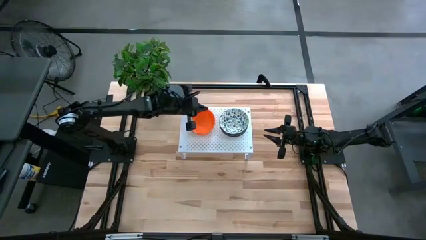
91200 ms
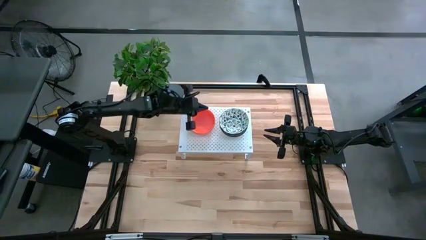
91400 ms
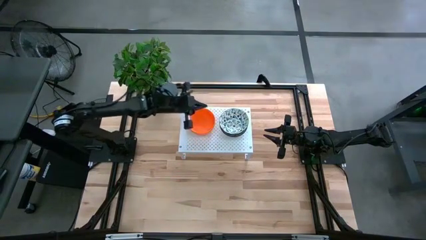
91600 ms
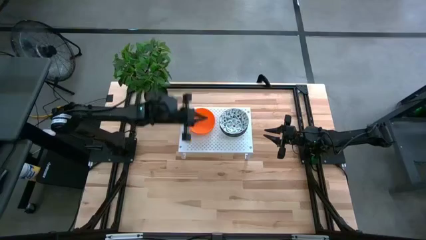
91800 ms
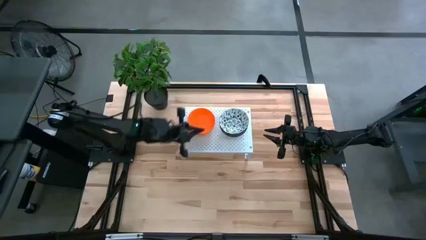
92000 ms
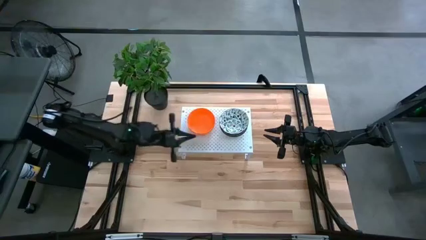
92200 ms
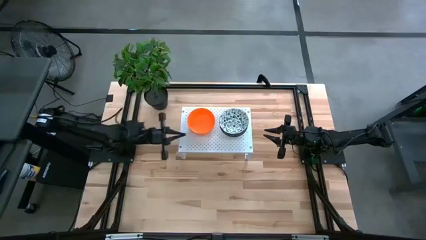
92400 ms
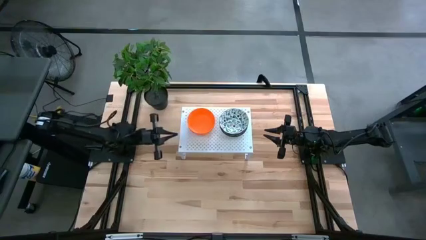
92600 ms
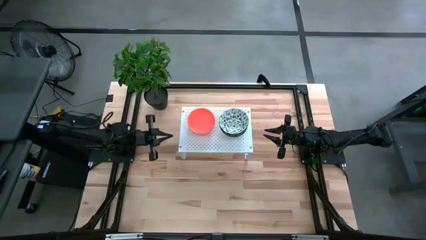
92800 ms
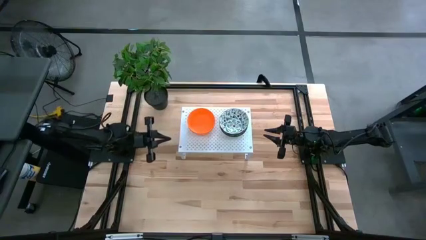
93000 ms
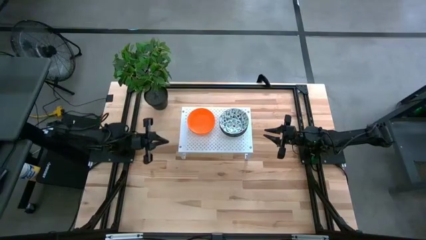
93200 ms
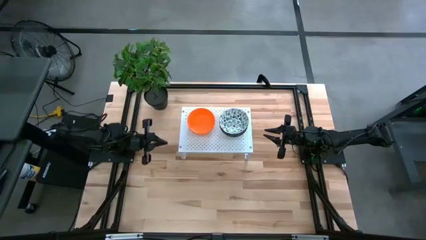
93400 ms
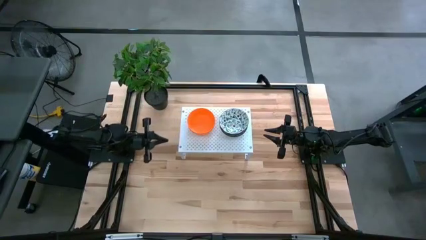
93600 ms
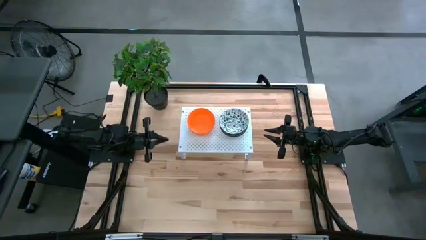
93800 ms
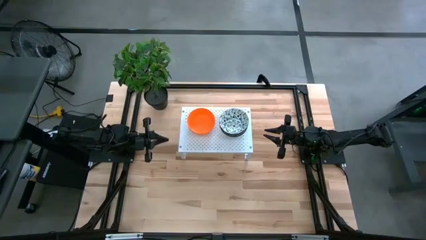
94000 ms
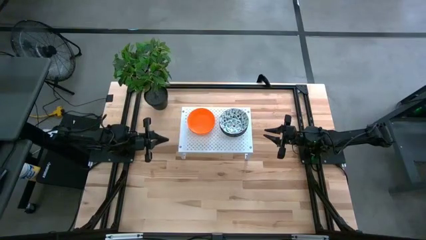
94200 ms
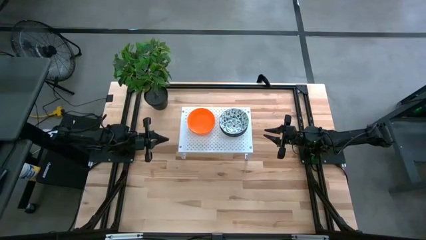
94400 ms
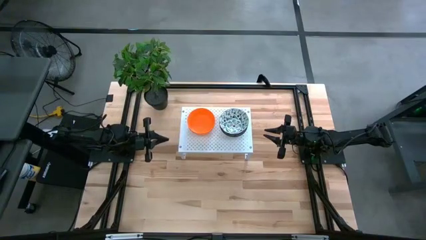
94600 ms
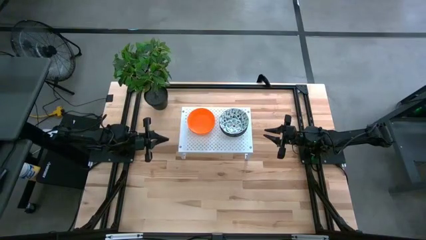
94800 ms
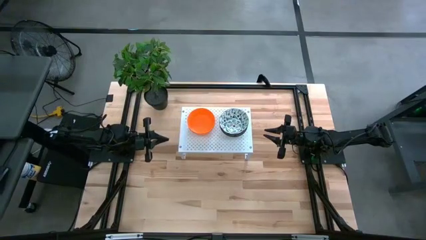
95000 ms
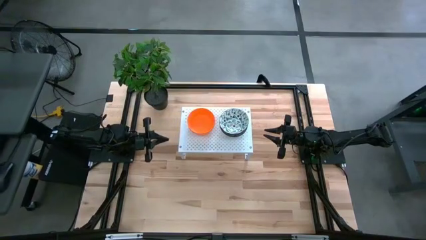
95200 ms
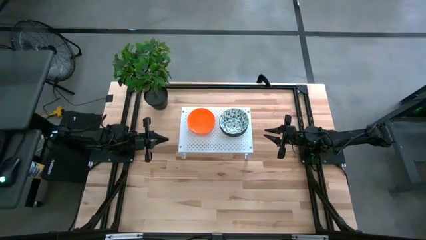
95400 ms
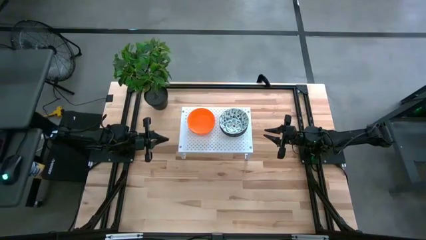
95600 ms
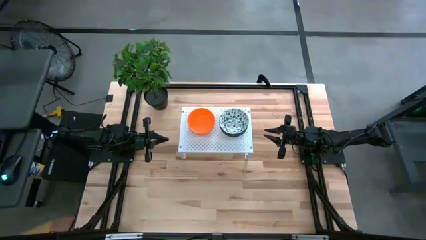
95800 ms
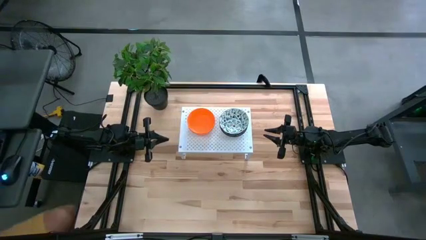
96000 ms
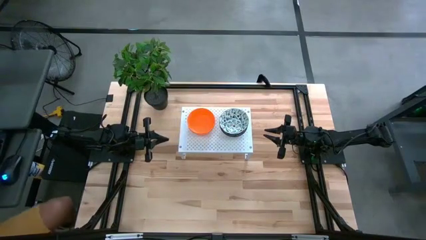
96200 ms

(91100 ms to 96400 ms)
Task: Pick & Place Mini bowls
Return to Home Position

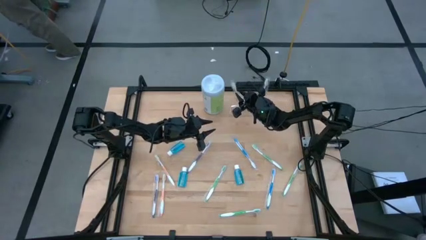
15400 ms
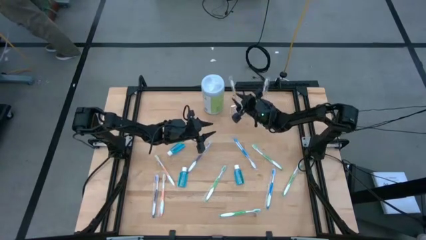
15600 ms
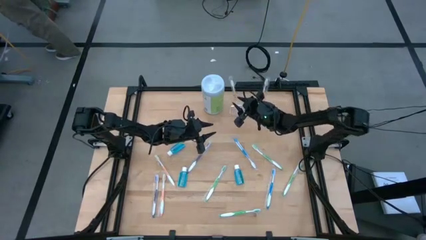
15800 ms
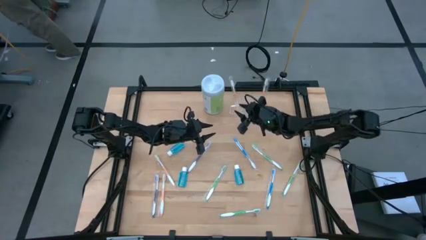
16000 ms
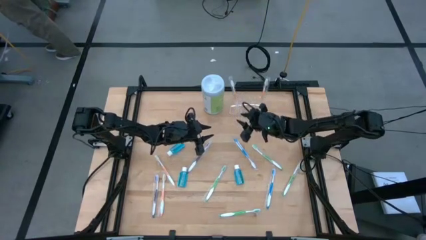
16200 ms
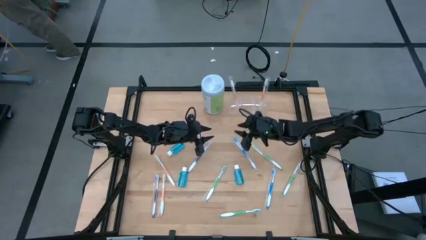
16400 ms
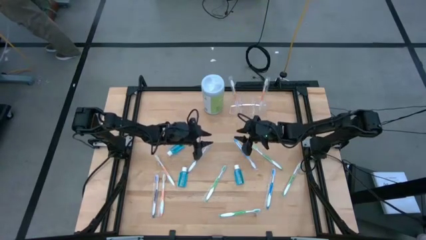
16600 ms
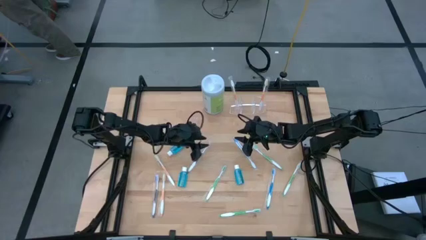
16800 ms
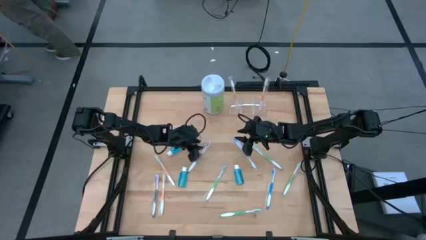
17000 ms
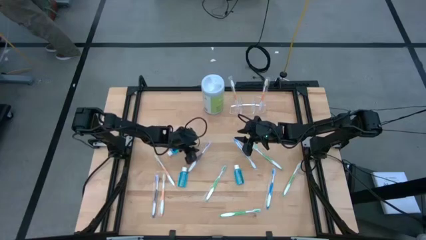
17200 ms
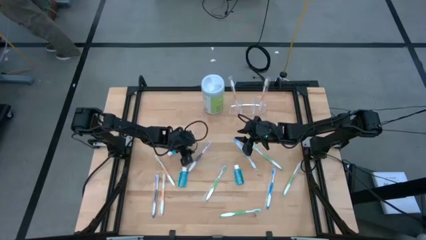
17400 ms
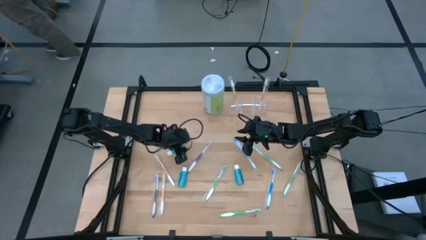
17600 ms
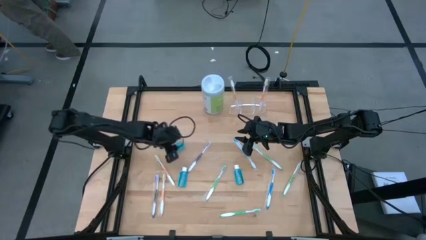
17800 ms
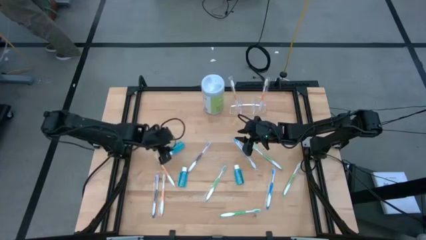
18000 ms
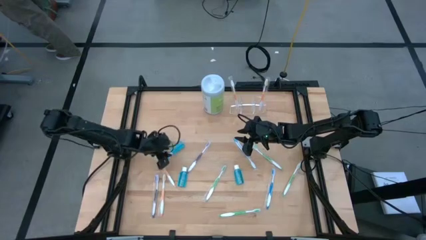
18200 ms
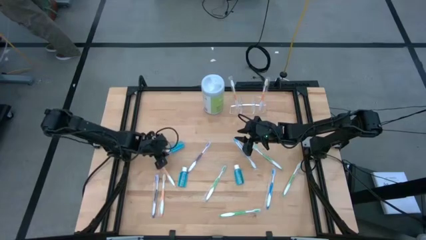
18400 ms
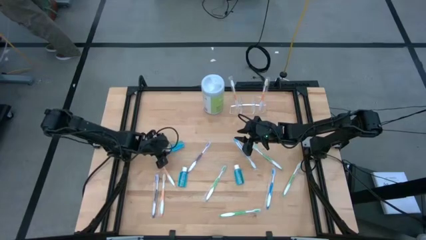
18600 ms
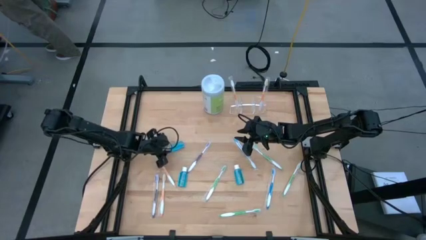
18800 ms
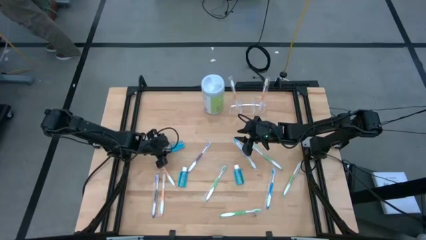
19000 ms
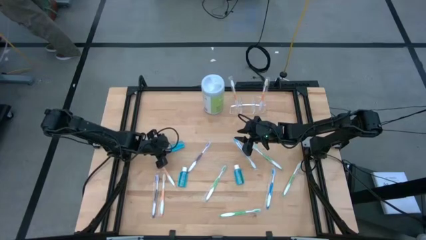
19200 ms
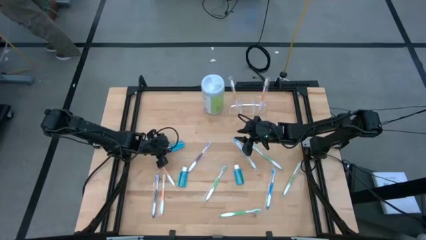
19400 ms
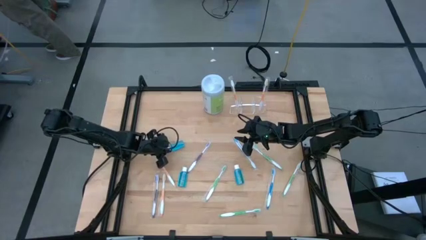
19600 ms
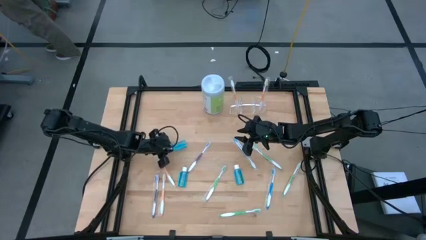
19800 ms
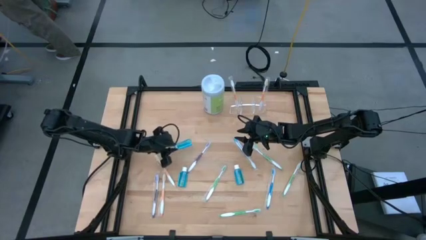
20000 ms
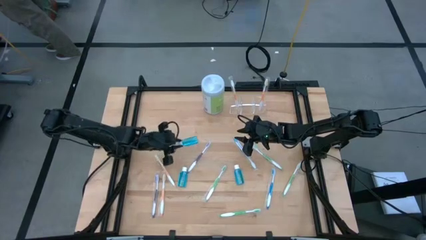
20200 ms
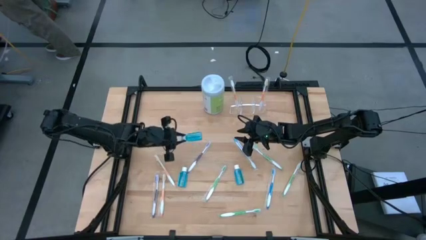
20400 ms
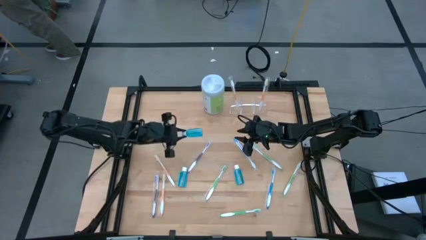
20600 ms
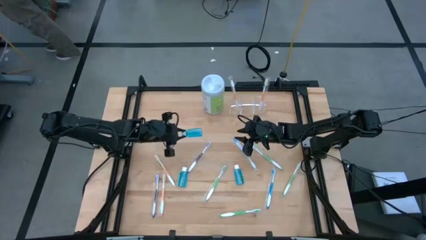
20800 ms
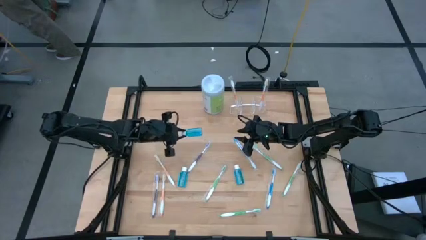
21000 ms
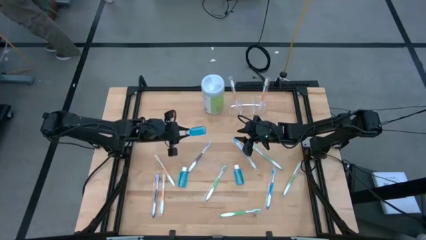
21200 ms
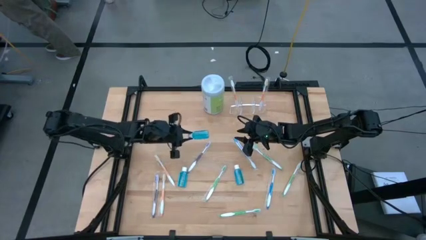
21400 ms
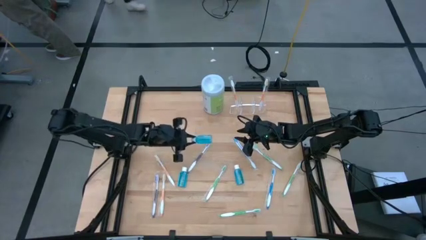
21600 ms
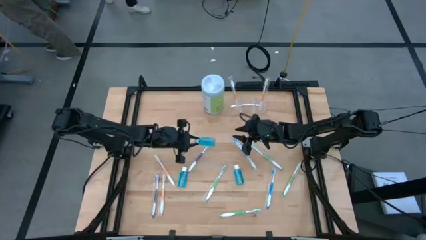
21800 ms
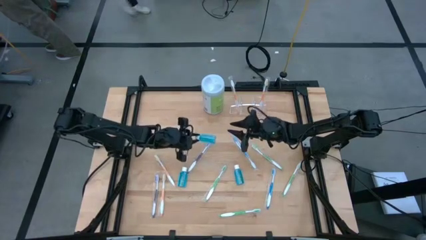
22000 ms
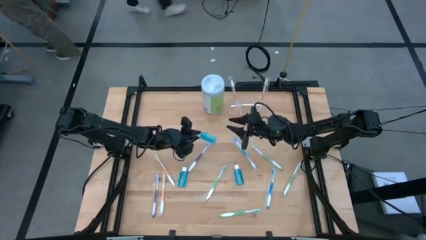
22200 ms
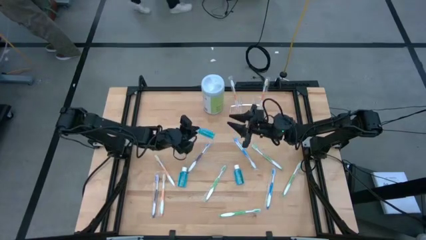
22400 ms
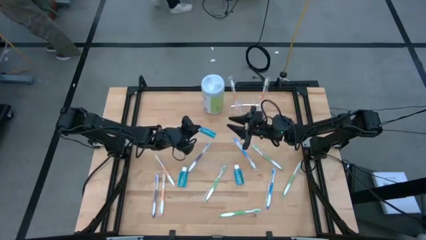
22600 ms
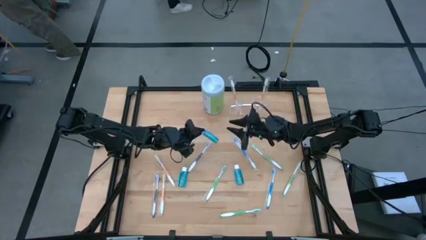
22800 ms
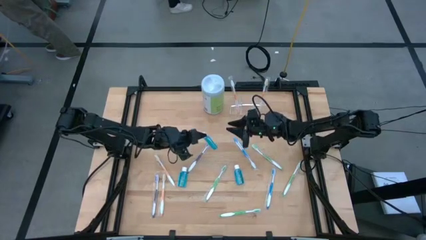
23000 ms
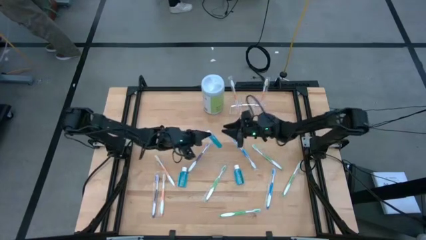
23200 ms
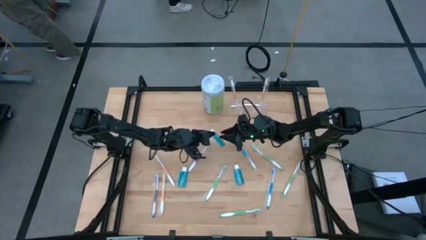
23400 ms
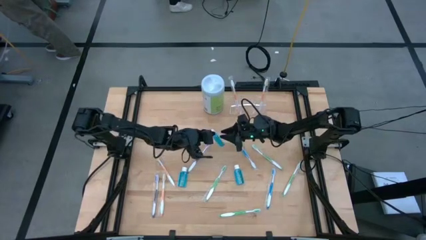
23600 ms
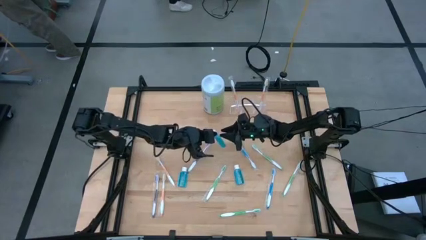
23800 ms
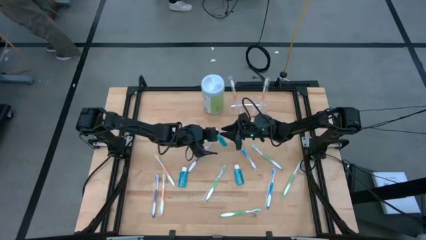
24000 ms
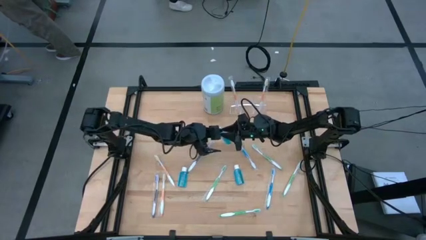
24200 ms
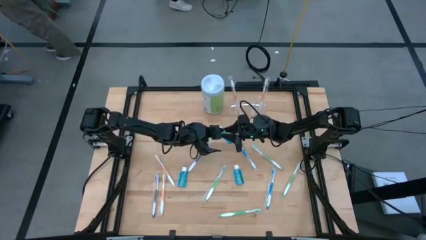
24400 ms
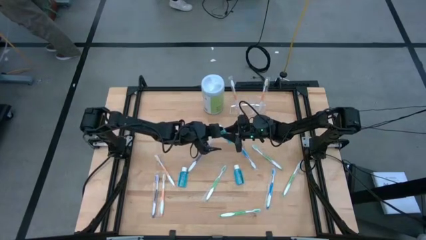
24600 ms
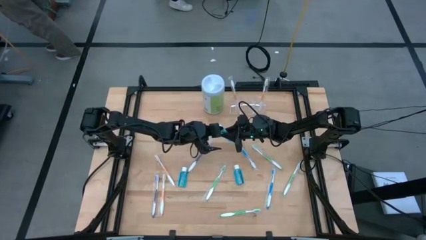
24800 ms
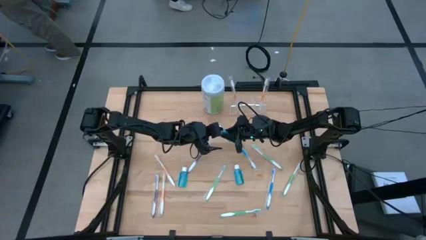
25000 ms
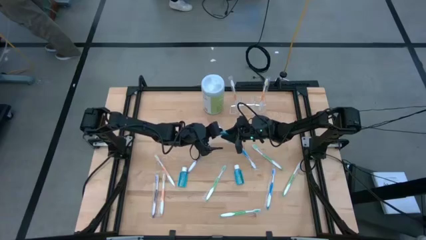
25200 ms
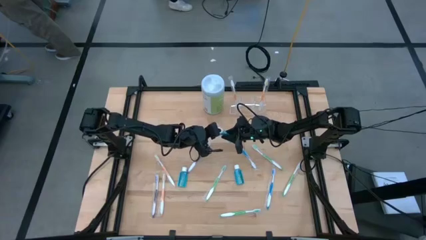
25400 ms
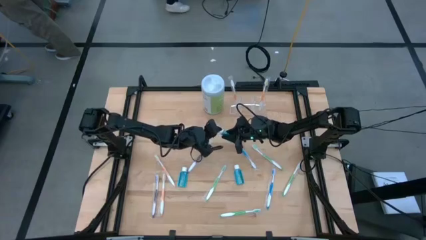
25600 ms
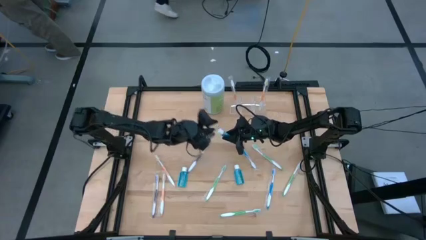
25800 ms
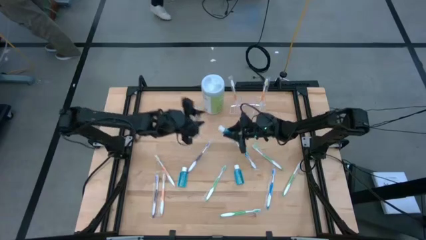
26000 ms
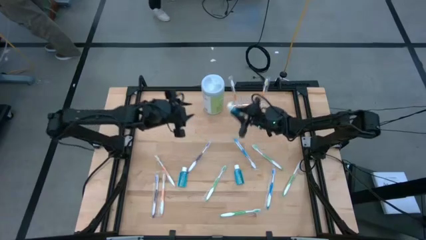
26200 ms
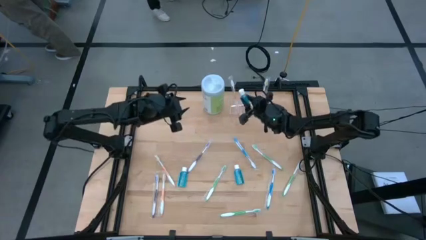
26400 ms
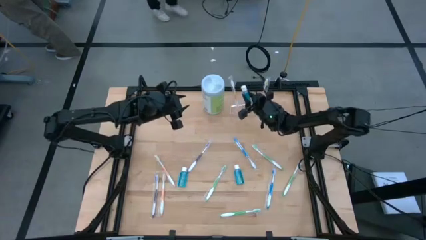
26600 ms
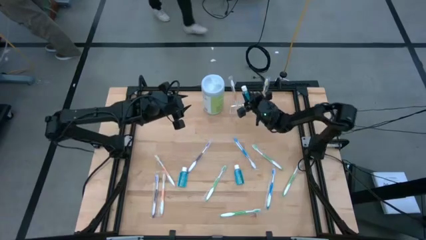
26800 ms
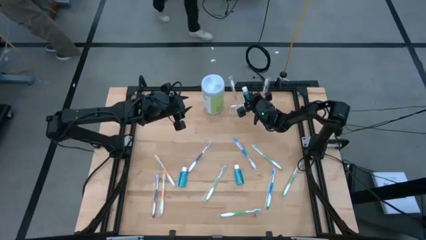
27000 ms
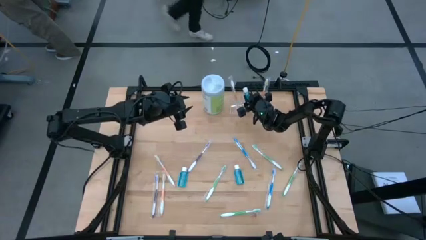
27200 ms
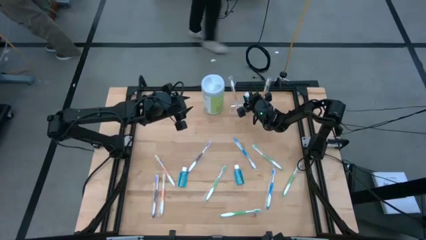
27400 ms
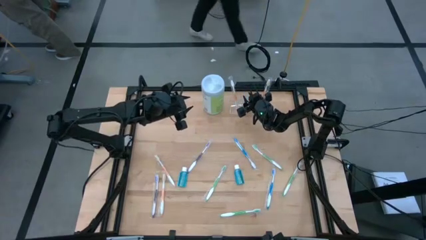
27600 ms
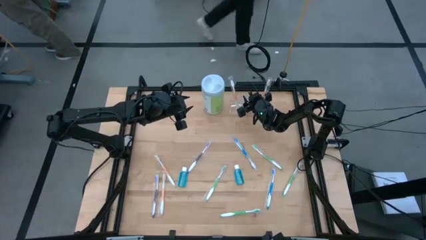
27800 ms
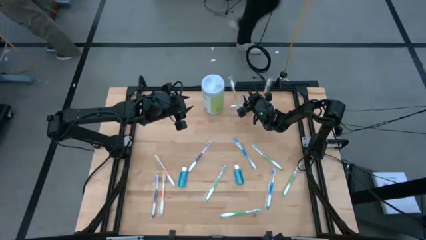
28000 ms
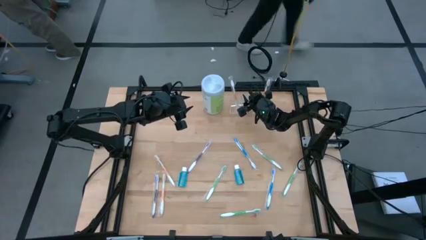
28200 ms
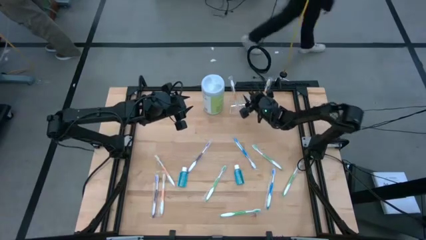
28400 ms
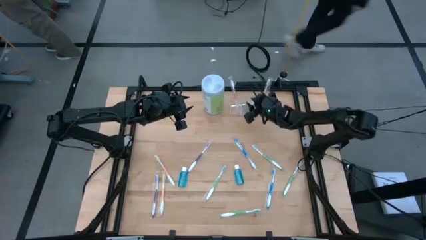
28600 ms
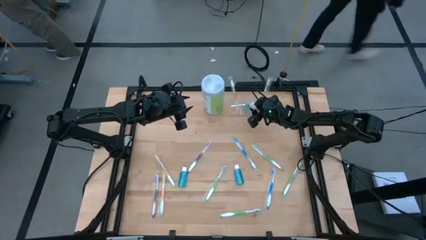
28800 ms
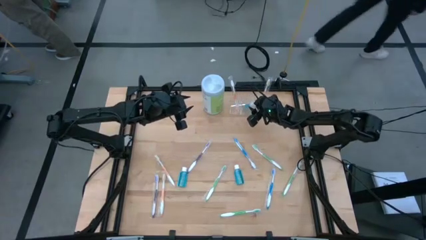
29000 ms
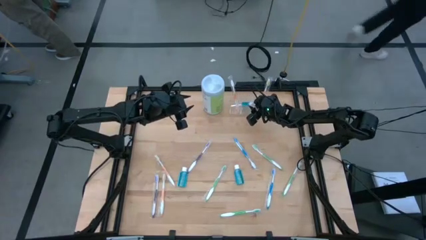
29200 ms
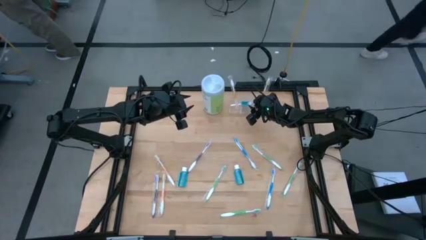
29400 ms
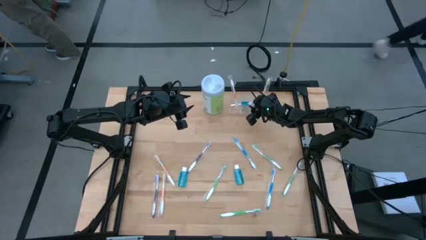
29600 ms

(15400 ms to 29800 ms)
Task: Pick & Place toothbrushing station
Put the blue mouthwash into the transparent organizer
